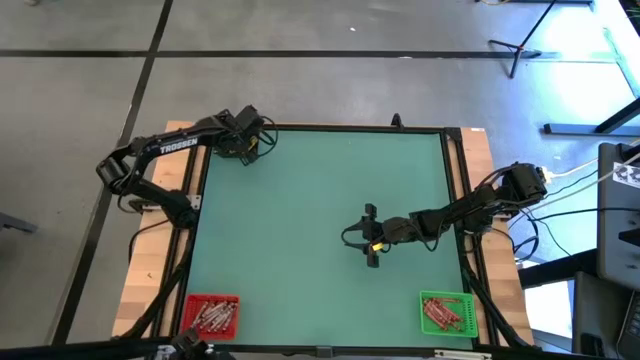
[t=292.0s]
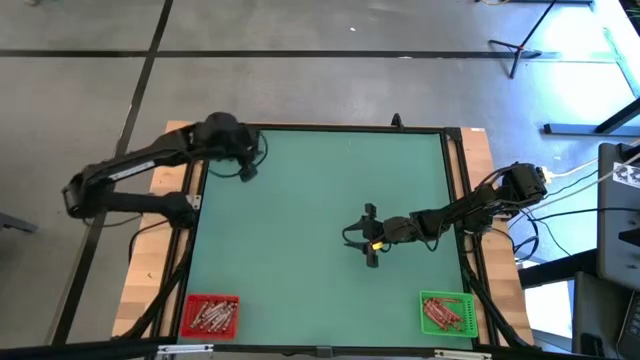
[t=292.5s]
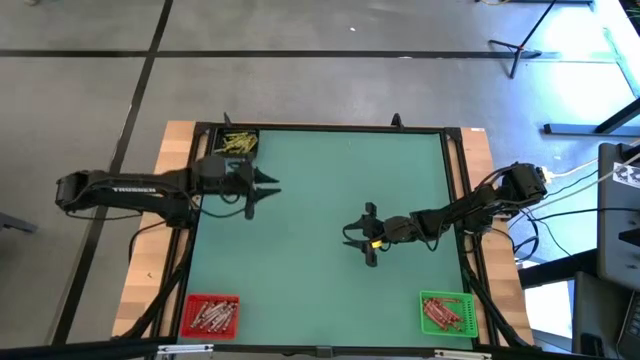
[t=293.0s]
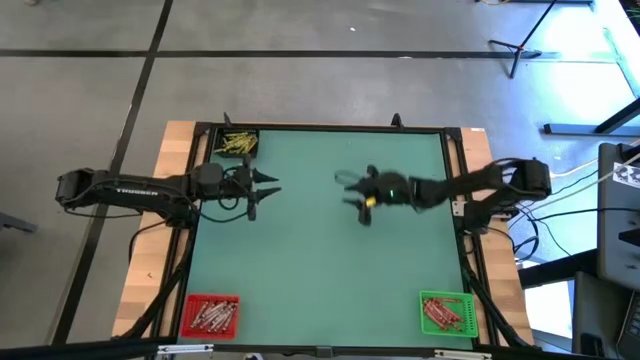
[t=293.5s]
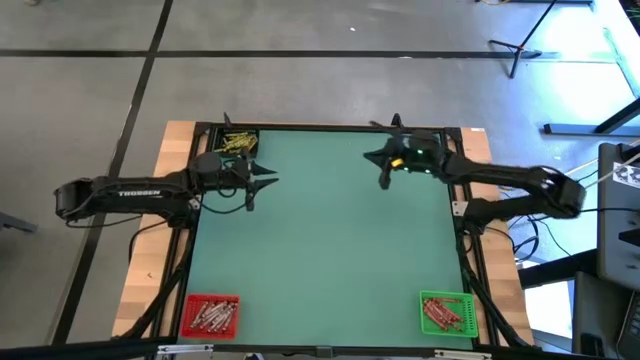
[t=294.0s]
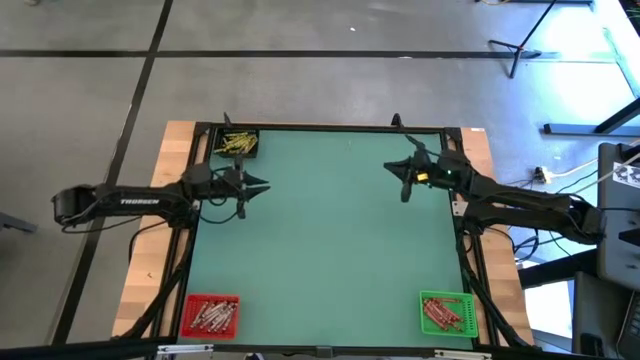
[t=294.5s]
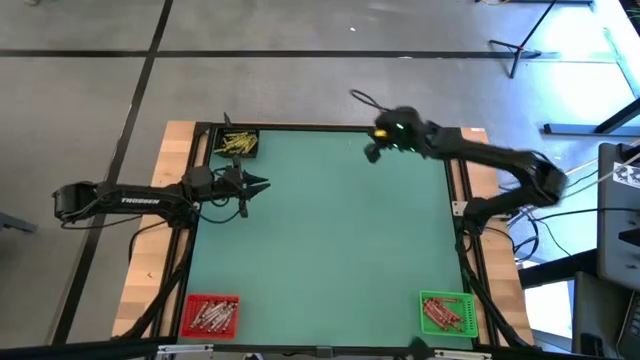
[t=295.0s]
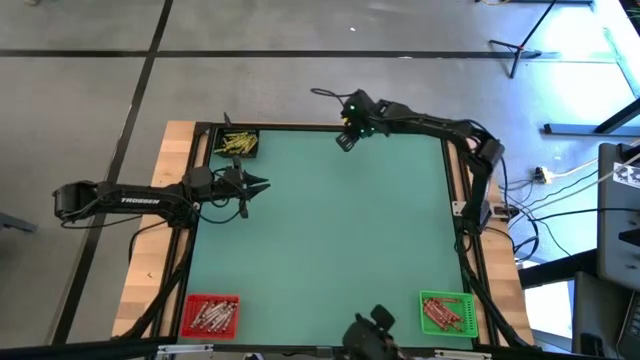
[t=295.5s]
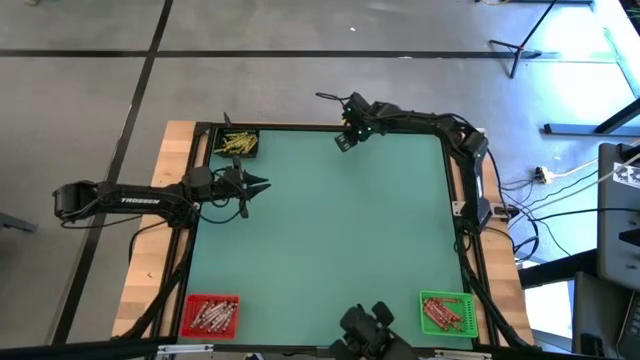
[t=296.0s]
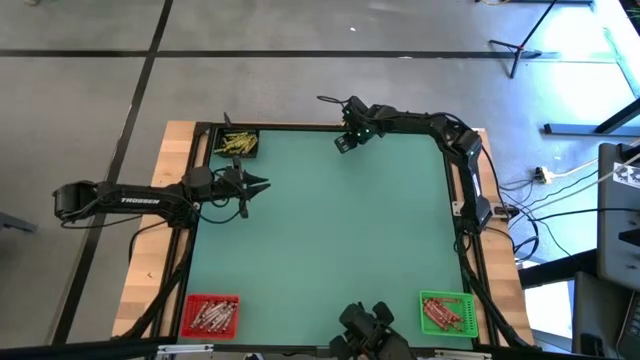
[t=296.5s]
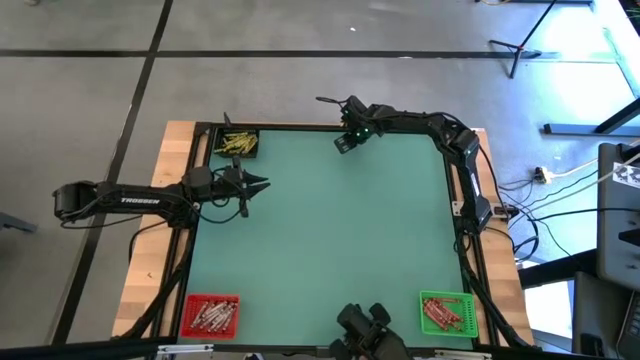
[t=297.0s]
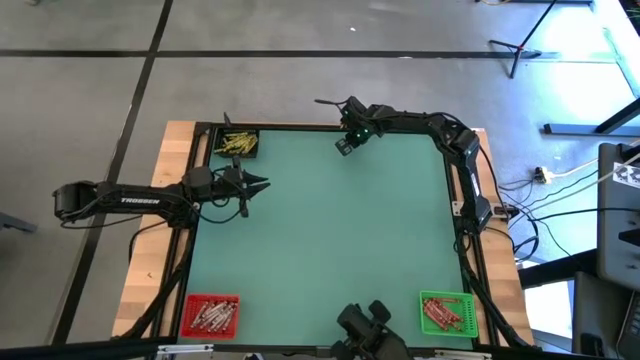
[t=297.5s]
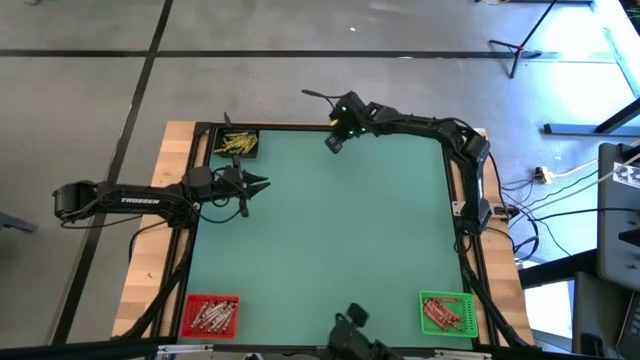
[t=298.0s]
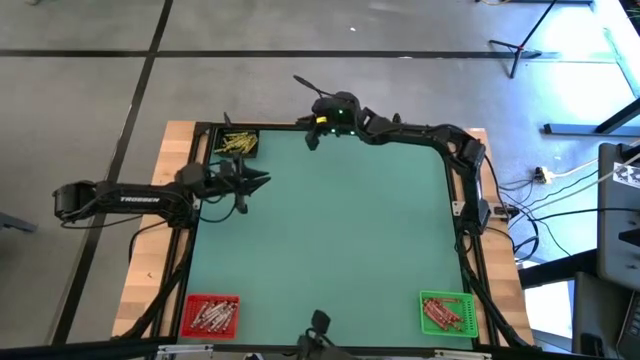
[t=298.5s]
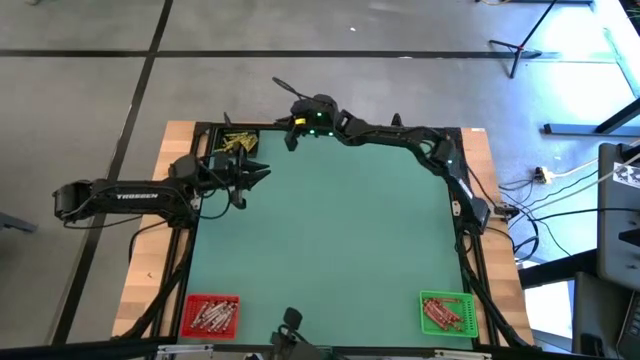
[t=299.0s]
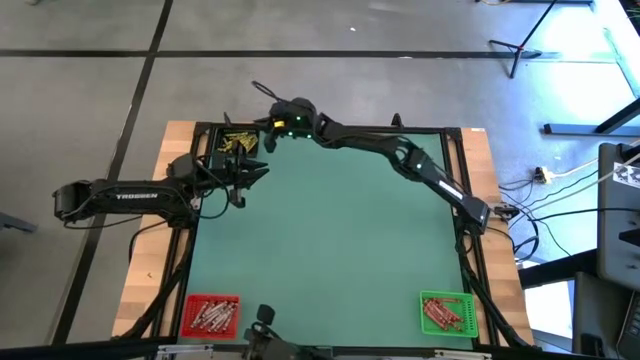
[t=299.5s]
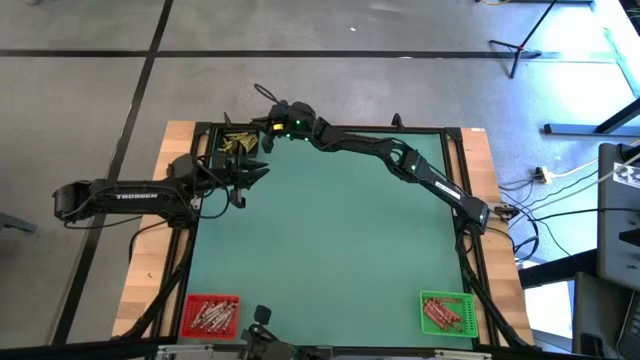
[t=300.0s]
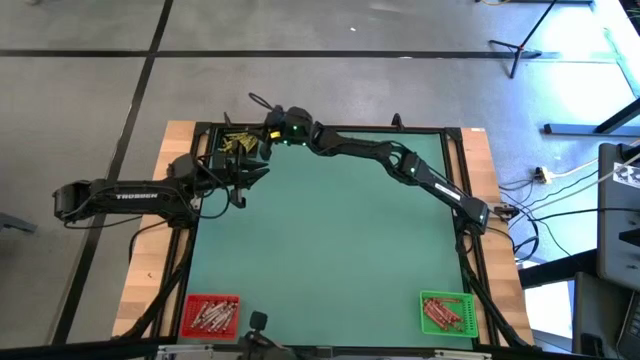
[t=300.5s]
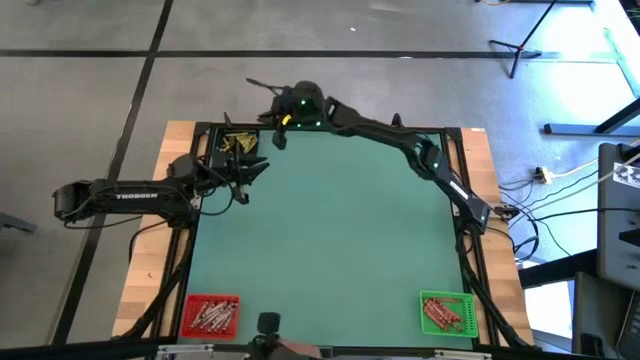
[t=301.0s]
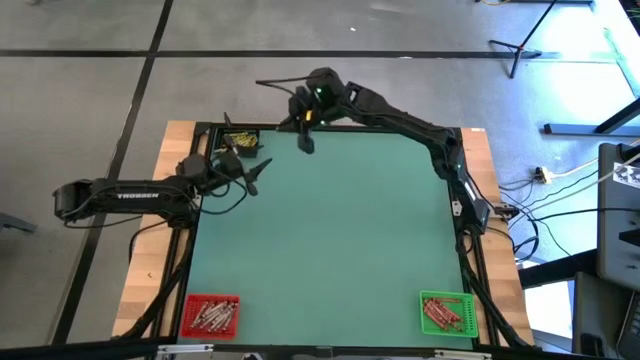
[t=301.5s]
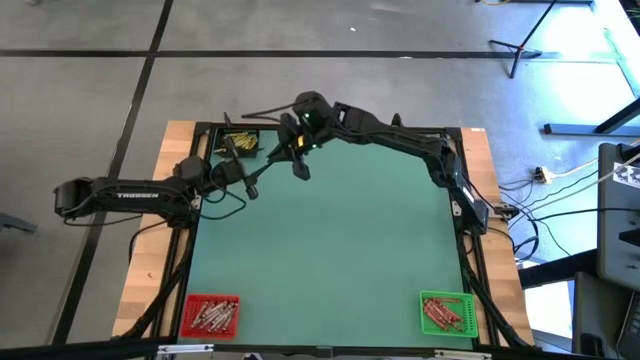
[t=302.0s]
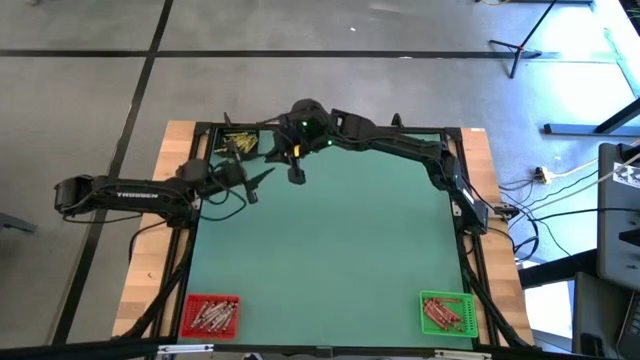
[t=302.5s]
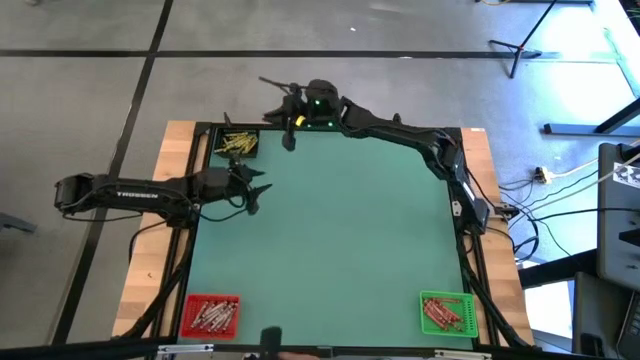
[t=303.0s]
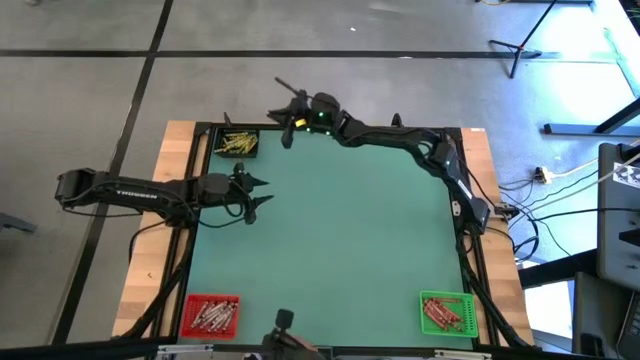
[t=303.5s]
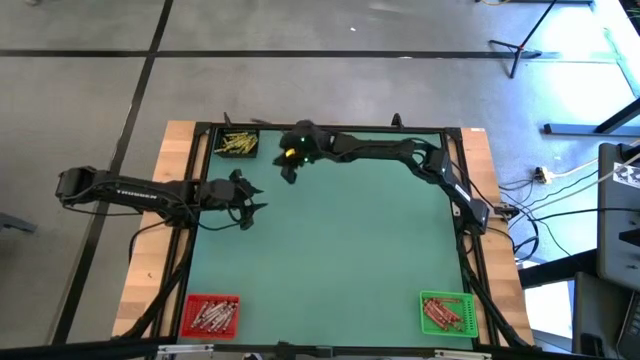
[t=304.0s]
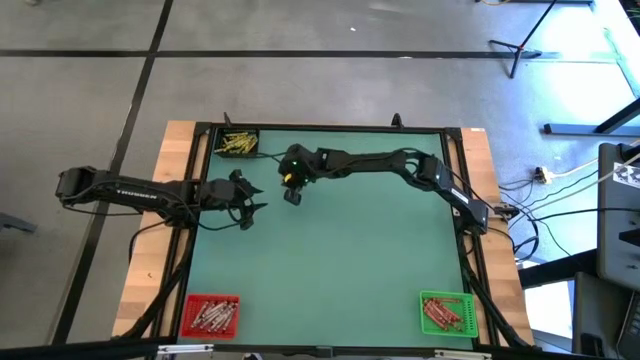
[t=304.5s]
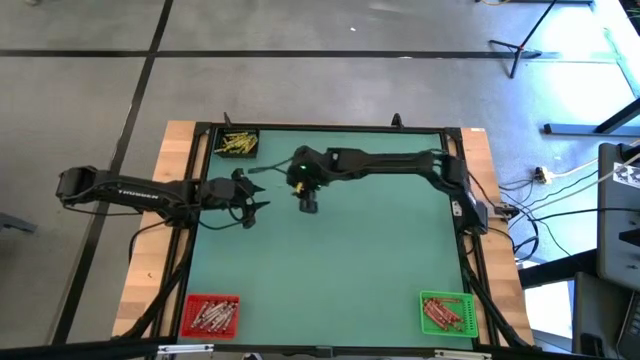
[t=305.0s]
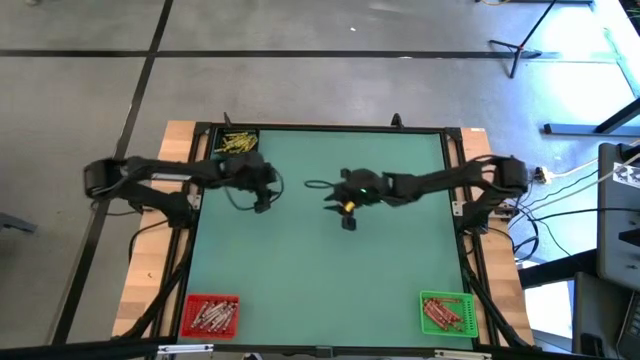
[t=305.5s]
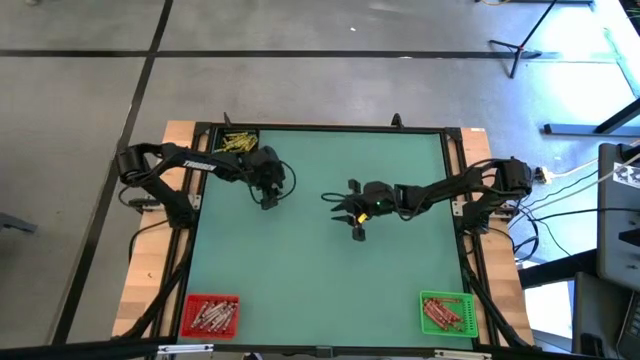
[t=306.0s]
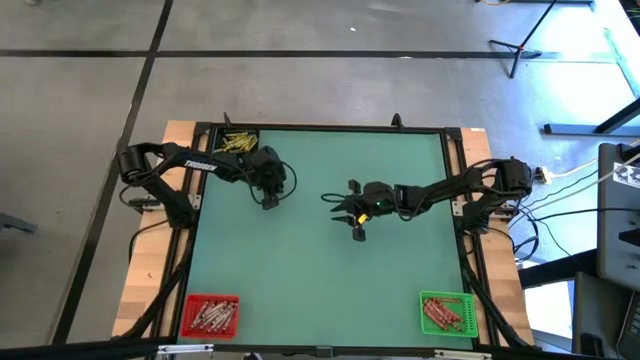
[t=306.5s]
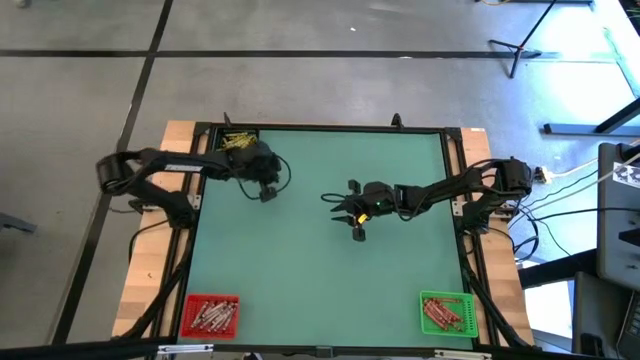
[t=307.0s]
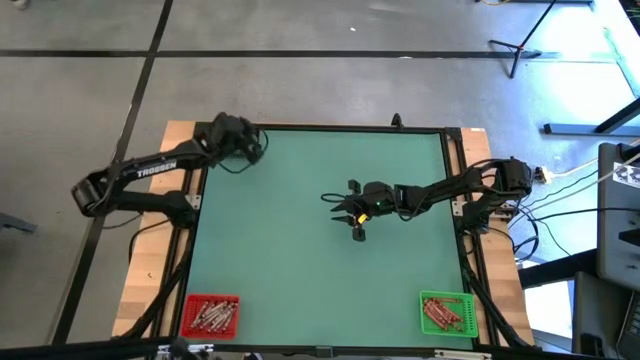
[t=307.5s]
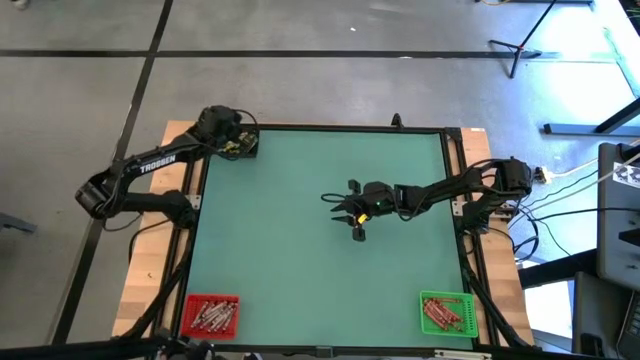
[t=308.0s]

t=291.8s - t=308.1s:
Task: Sort crayons
Put the yellow crayon into the black bin

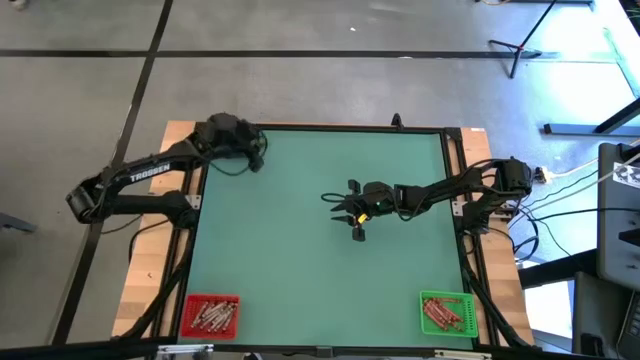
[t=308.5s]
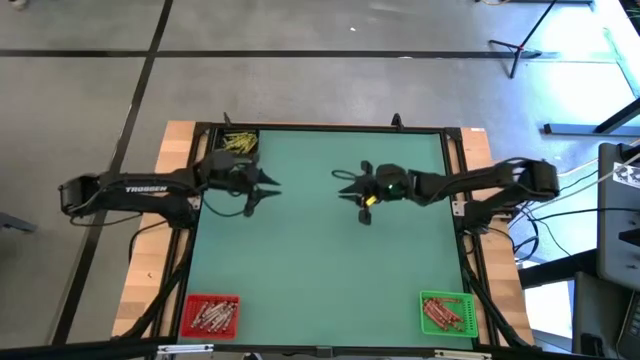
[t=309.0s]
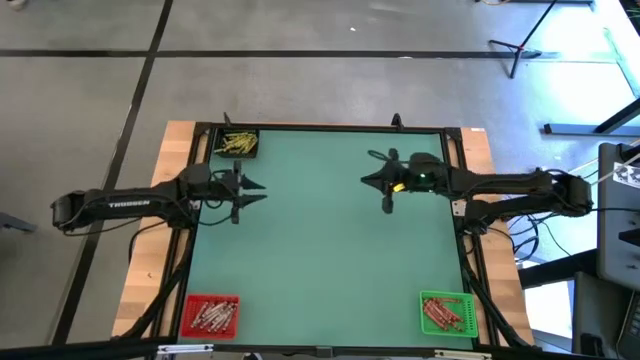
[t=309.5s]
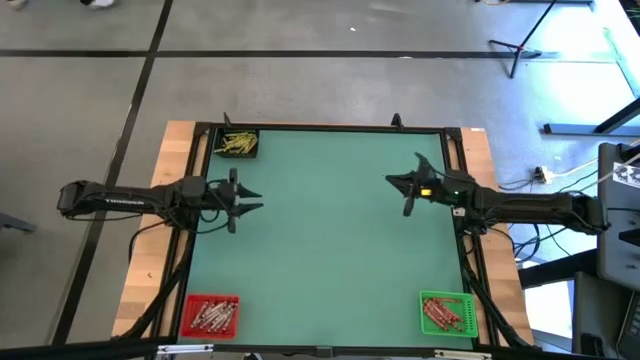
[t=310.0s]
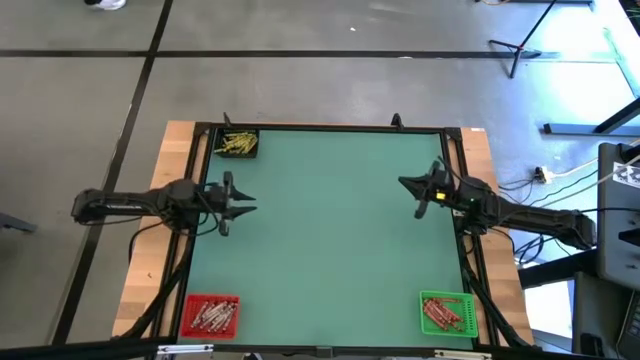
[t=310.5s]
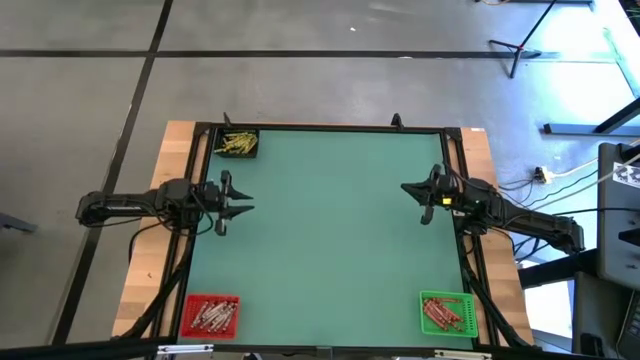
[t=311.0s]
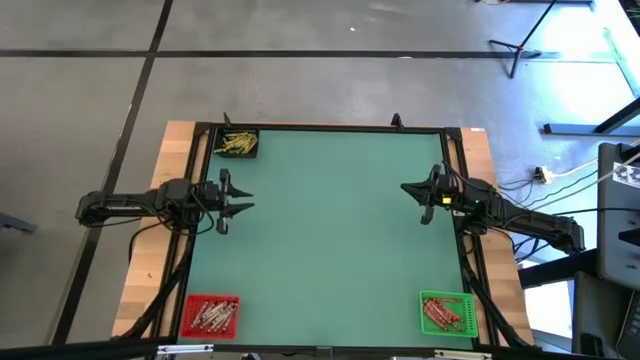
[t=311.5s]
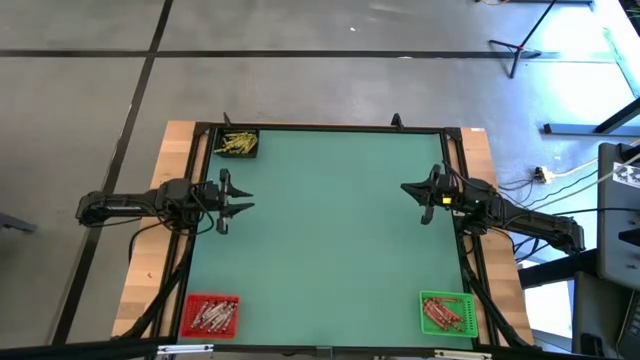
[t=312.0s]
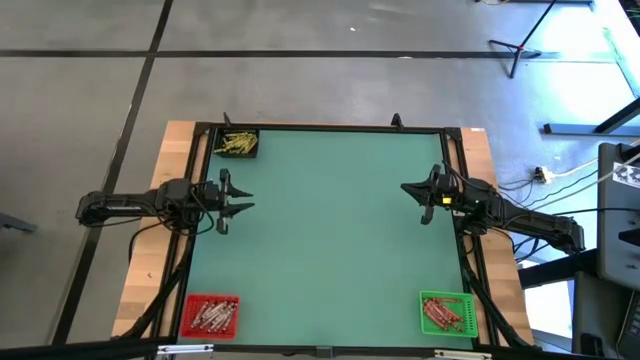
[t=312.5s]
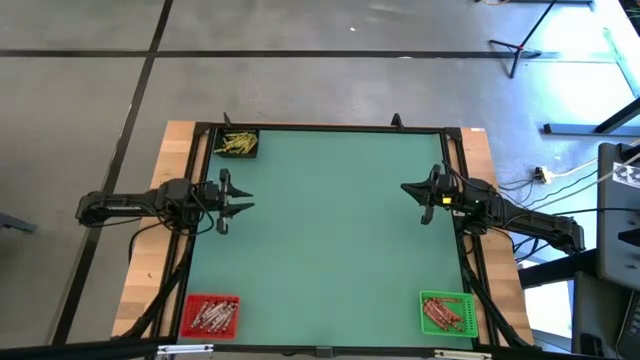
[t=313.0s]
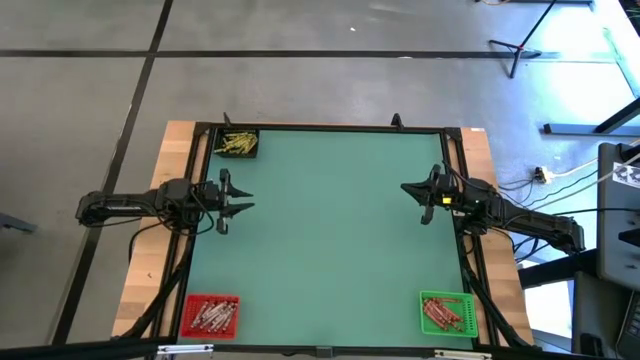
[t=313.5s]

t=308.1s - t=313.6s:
Return to Home Position
